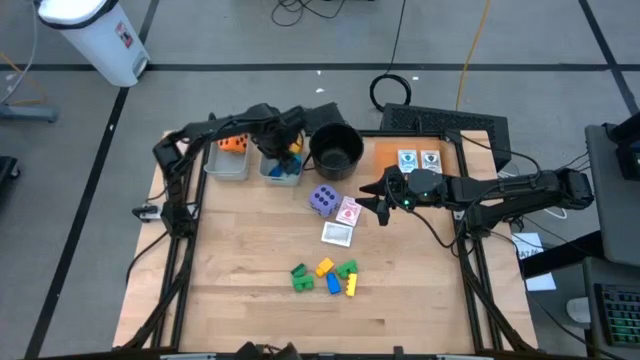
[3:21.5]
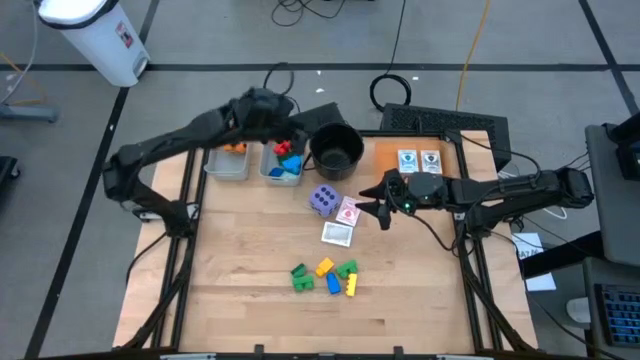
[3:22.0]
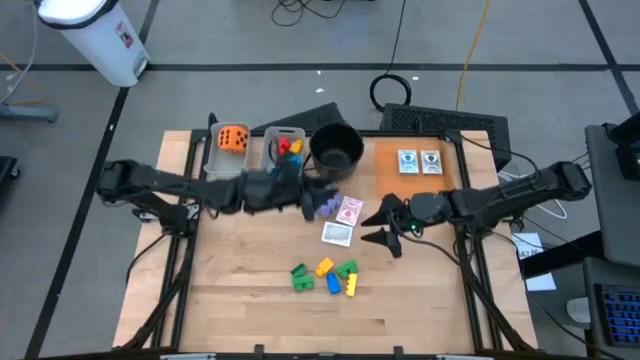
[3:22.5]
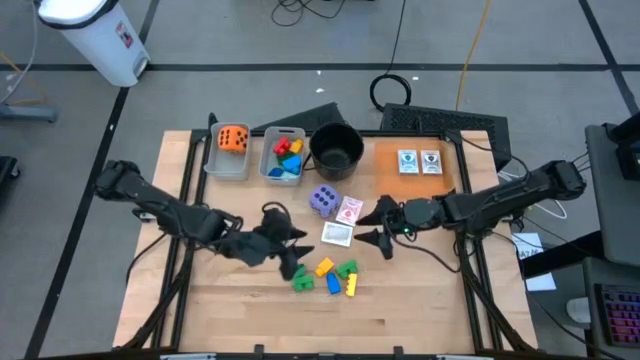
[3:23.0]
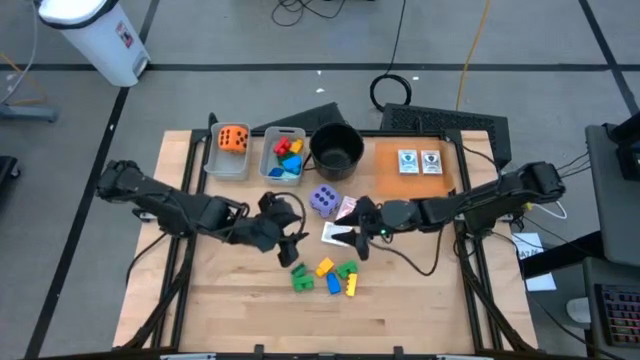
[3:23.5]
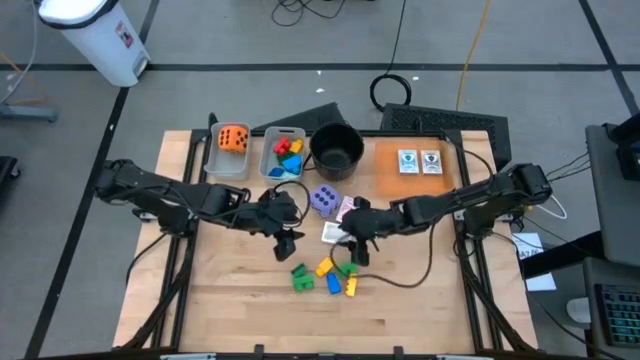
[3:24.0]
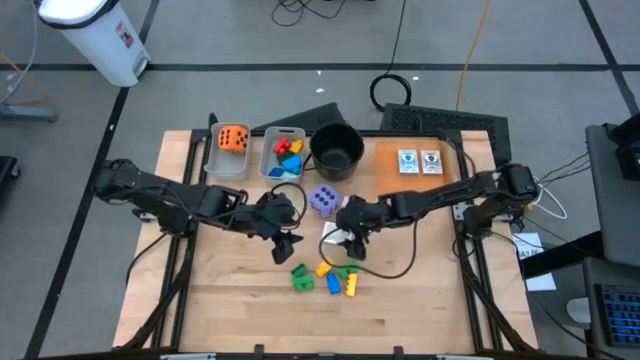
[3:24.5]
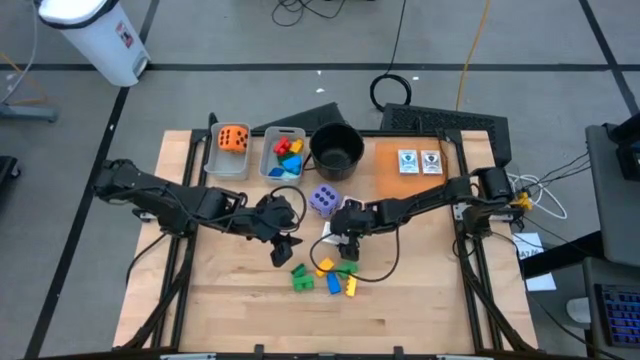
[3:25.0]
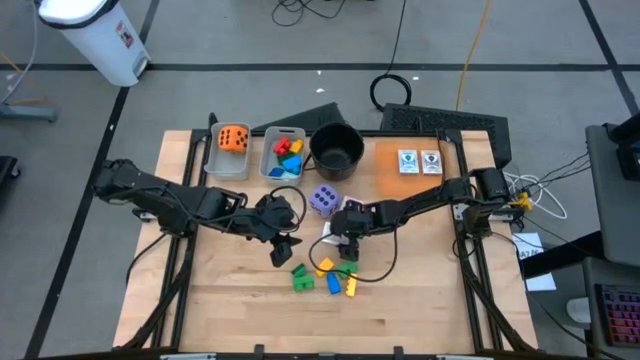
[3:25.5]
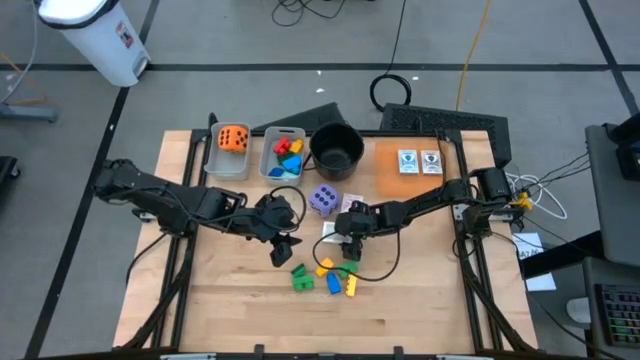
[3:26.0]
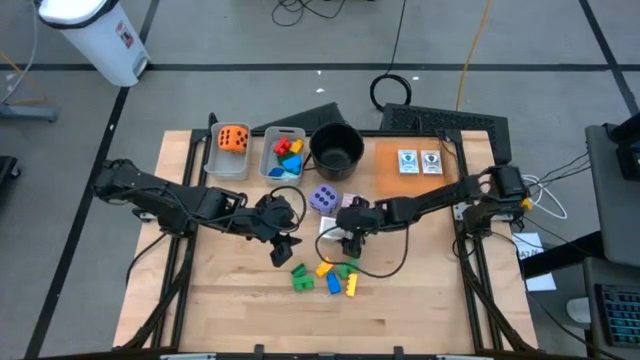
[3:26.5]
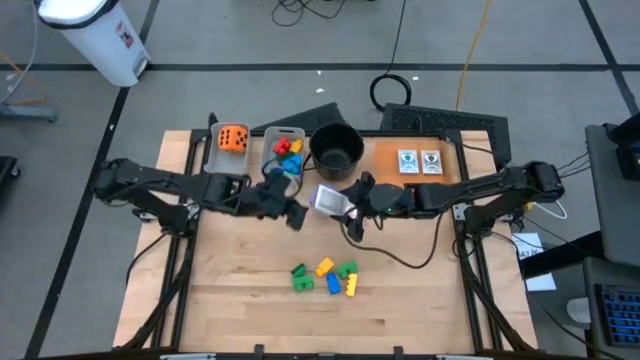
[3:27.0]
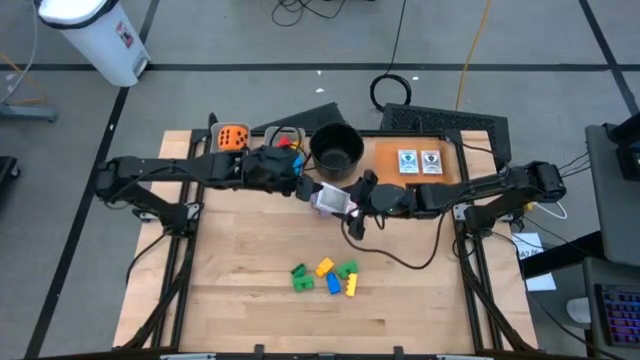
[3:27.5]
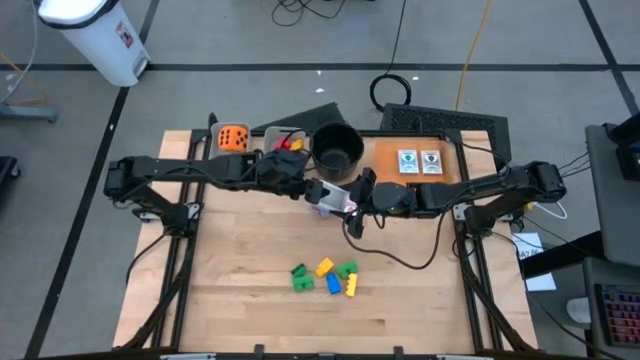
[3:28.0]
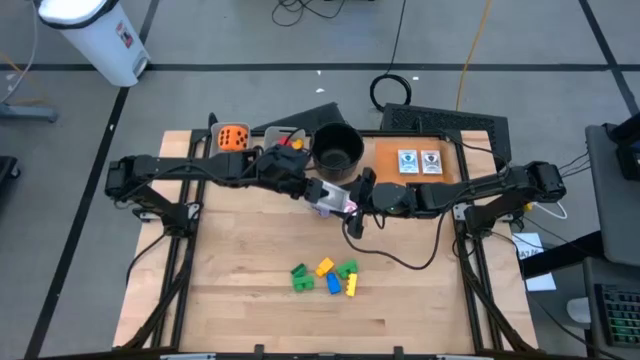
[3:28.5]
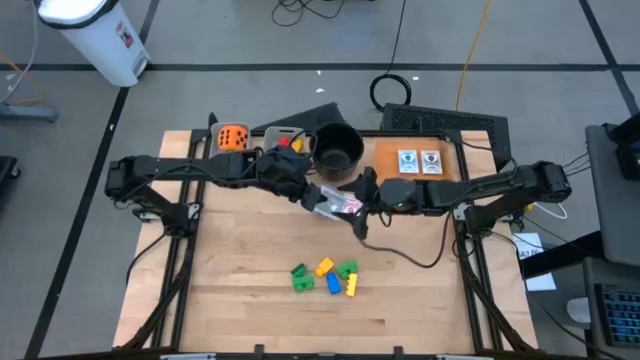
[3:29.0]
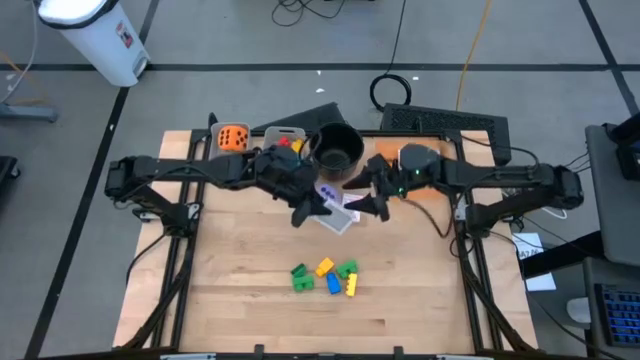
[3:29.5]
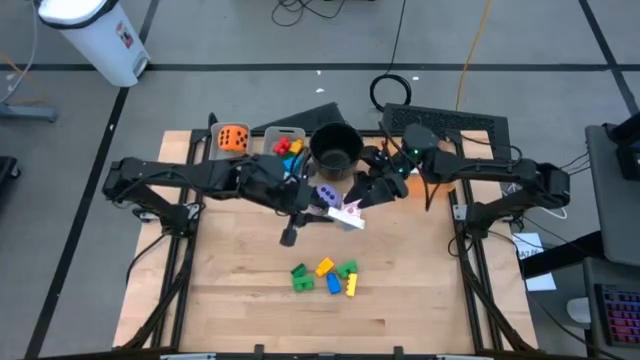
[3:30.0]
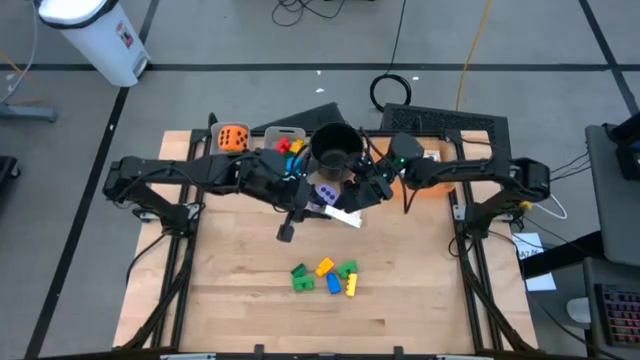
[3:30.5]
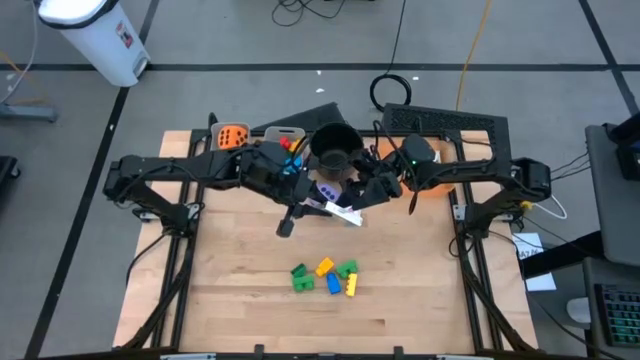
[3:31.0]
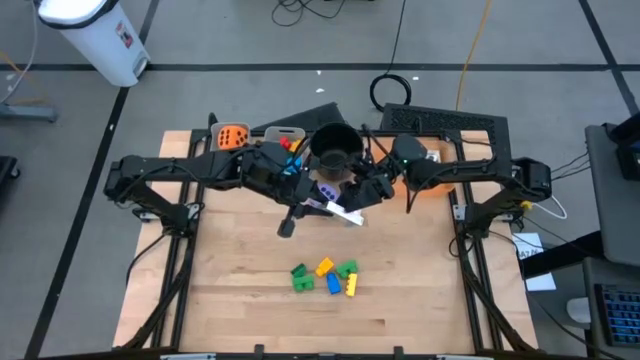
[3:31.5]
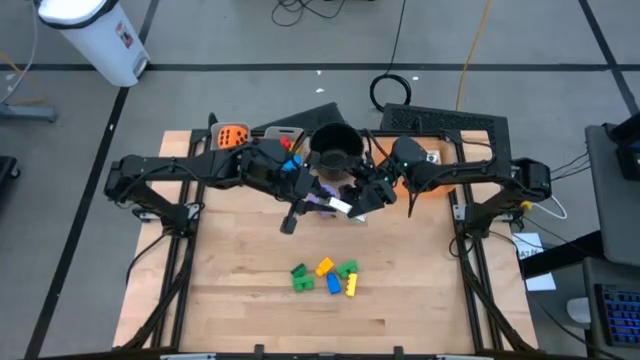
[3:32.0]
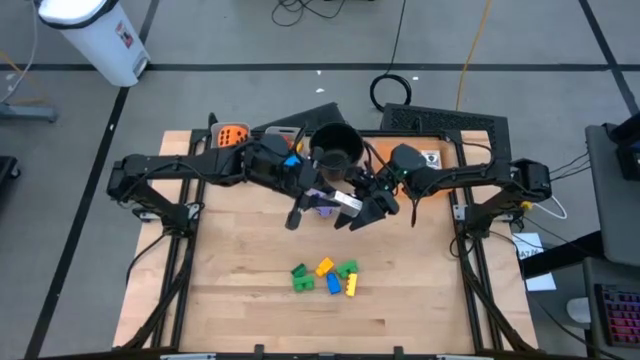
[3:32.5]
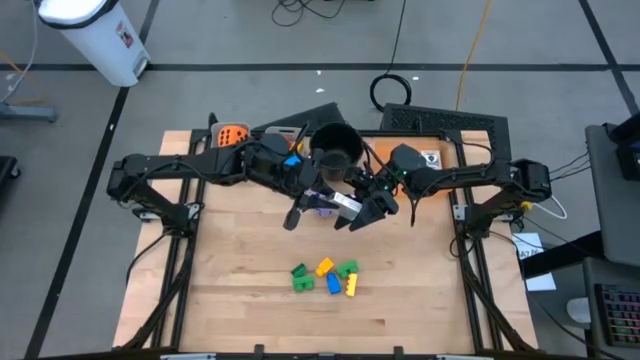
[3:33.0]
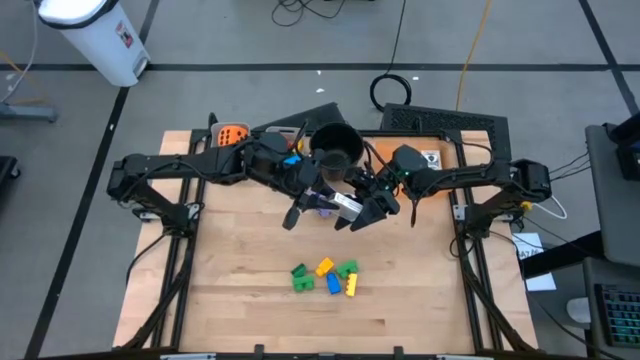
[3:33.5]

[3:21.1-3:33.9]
Task: Pick & Place Toys
Put the brown deck of cards into the orange bin

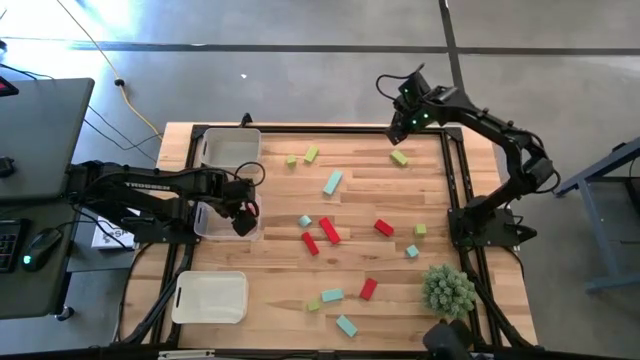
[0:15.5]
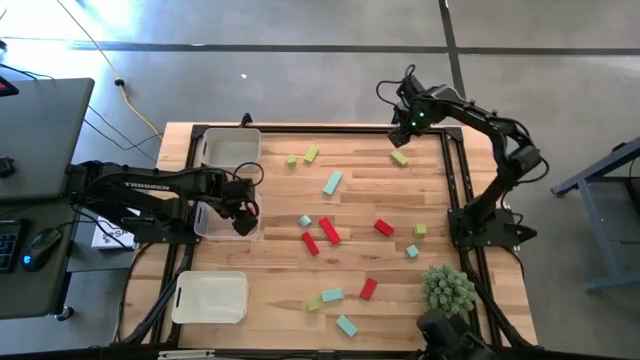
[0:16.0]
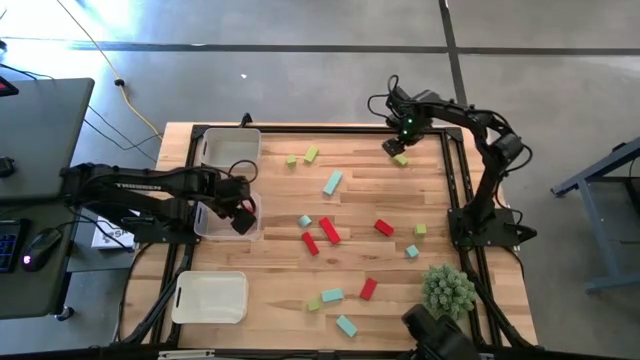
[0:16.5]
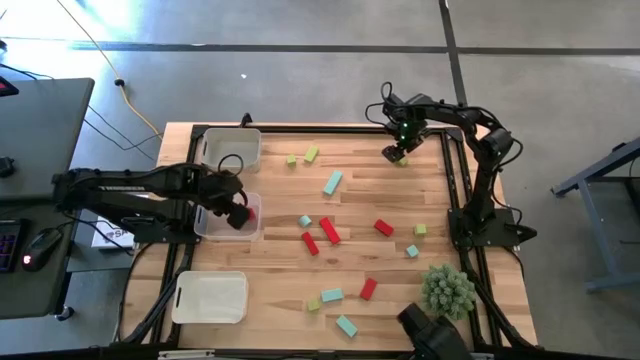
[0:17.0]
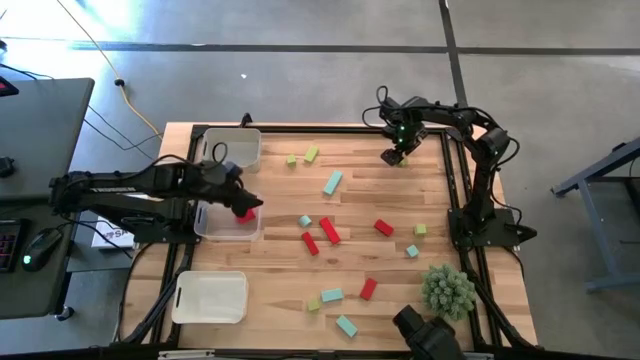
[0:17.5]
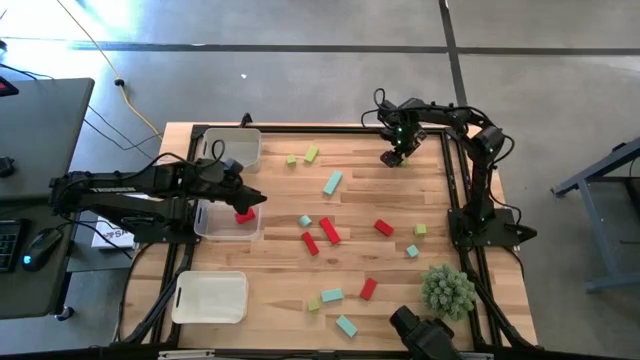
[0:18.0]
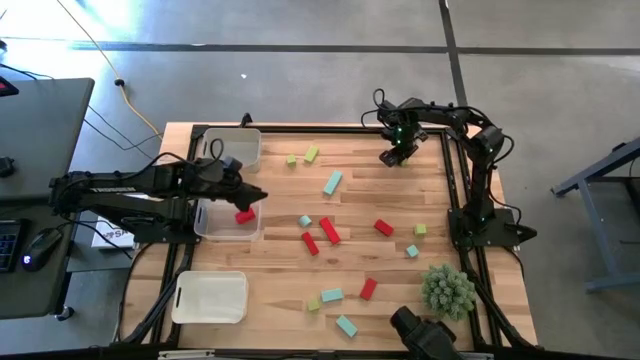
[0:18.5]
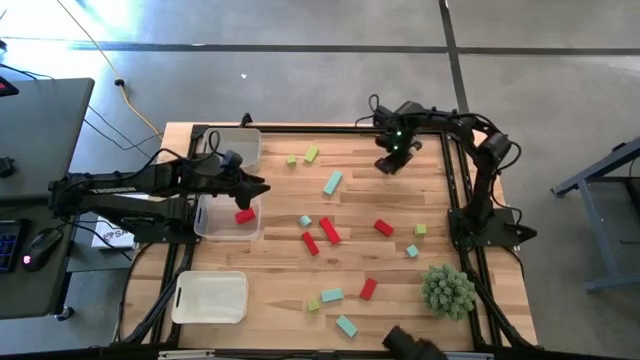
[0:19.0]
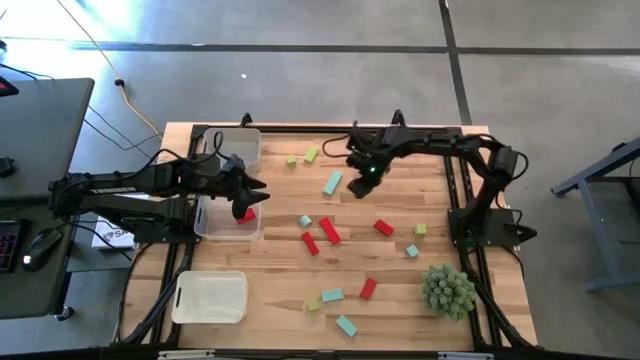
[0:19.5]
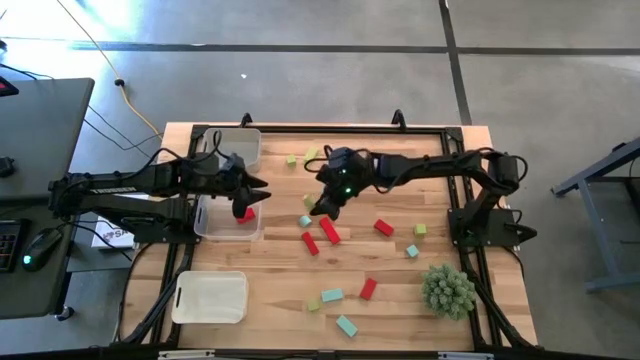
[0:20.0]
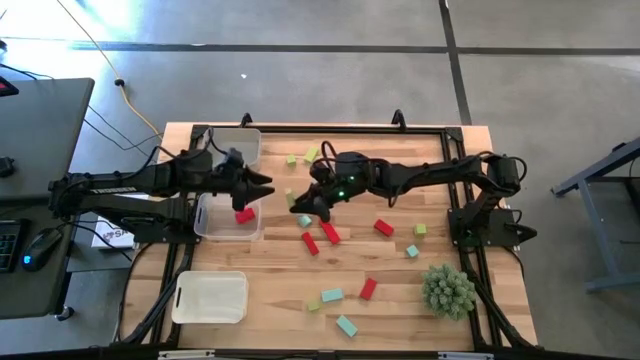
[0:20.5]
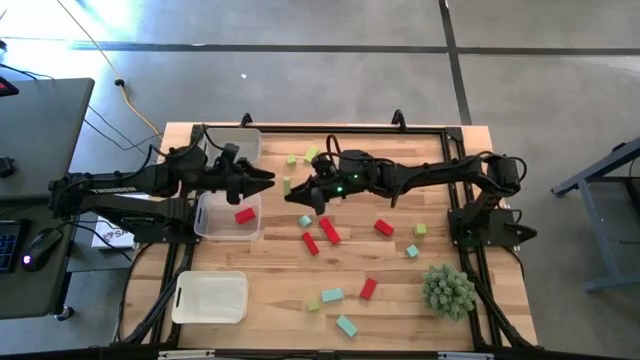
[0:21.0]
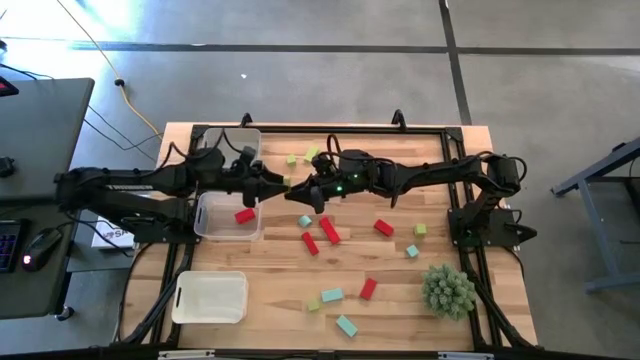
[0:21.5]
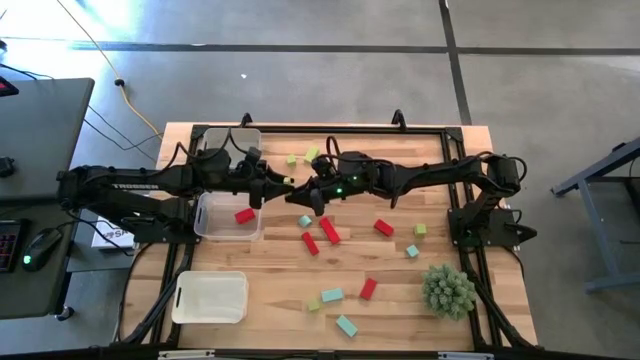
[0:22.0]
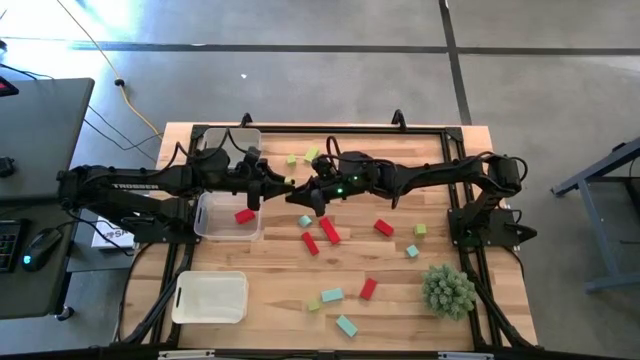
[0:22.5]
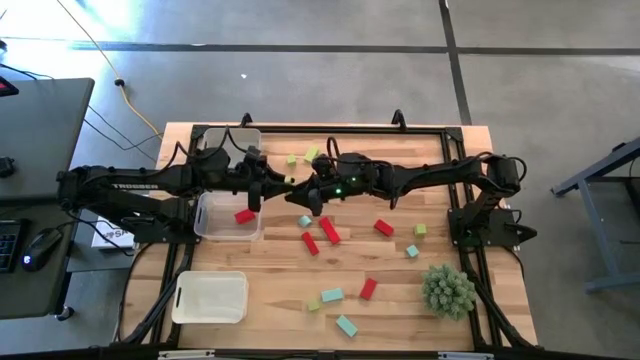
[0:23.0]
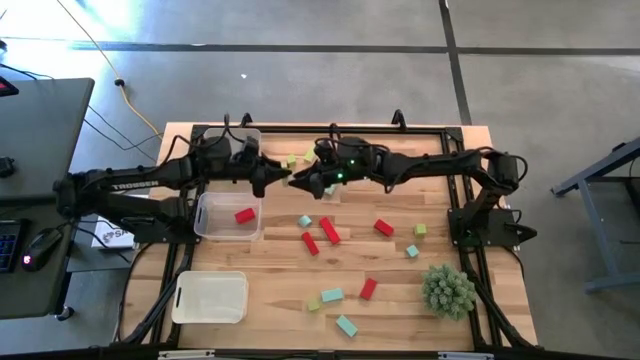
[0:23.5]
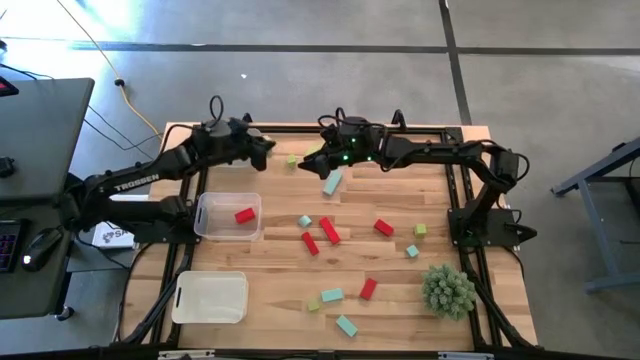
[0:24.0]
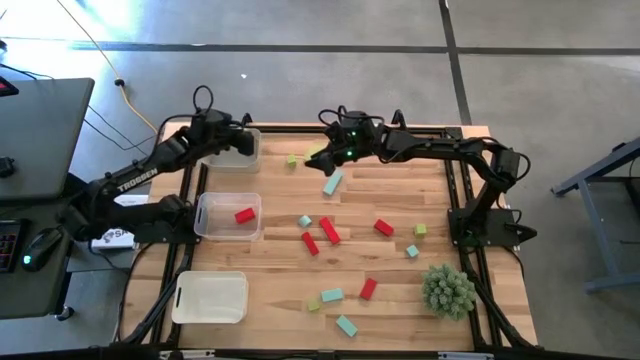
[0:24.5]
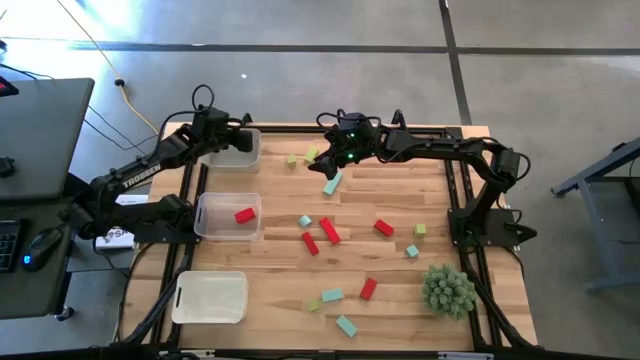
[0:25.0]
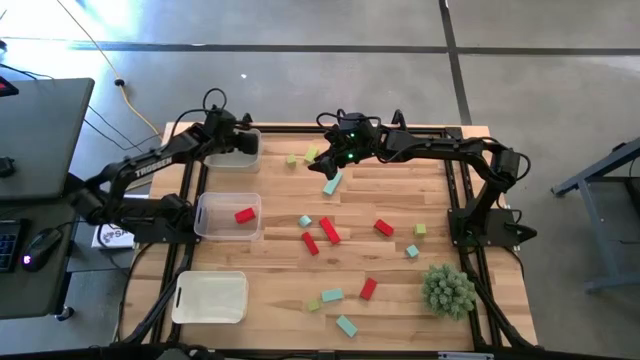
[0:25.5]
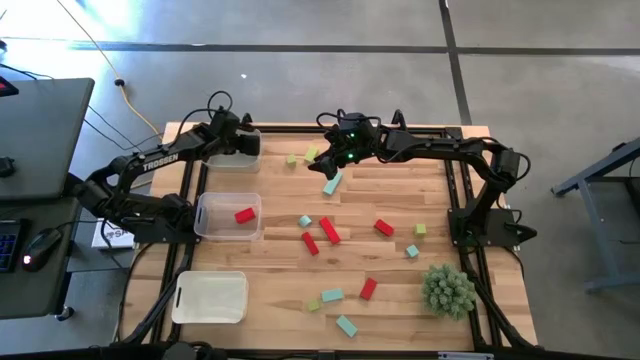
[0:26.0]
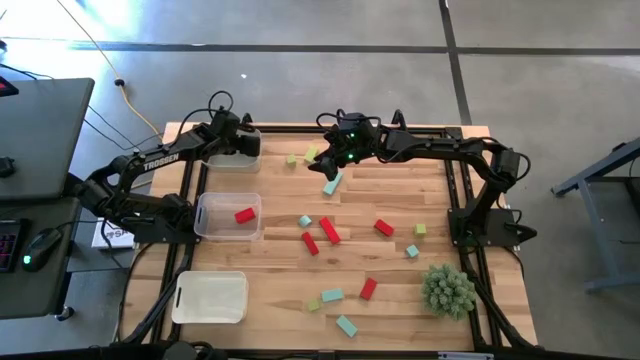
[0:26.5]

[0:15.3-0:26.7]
Task: Sort & place blocks by color
Put the light green block into the gray bin
